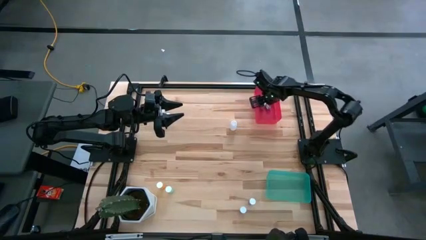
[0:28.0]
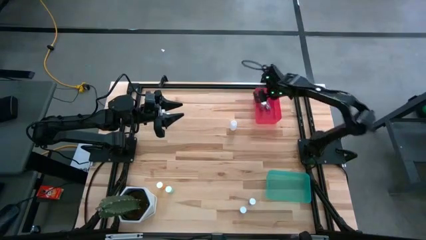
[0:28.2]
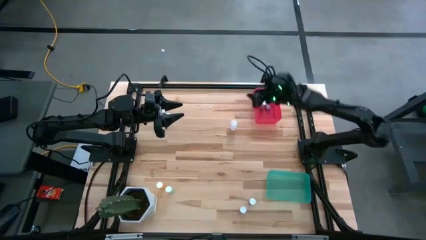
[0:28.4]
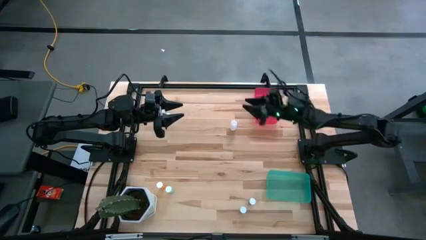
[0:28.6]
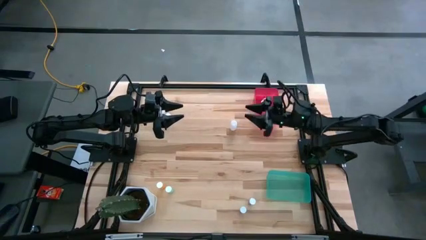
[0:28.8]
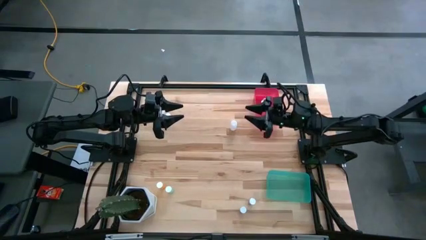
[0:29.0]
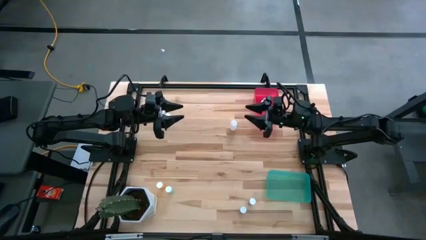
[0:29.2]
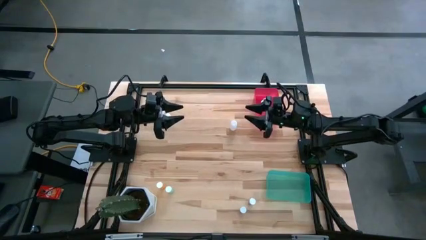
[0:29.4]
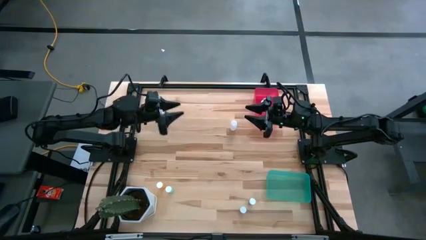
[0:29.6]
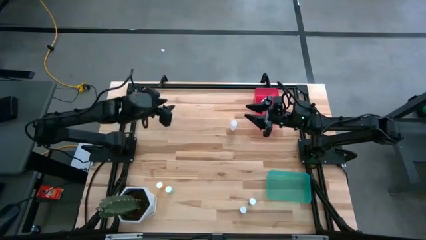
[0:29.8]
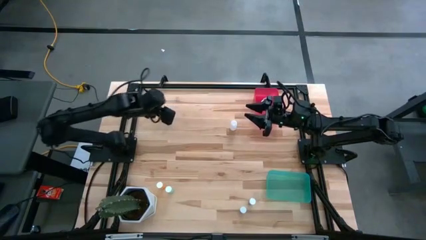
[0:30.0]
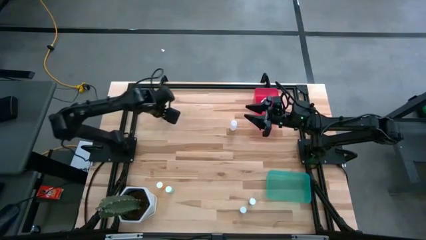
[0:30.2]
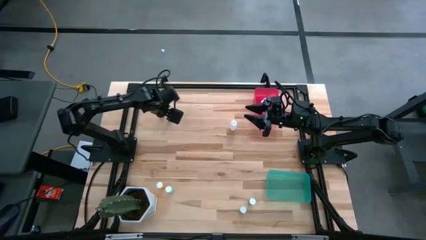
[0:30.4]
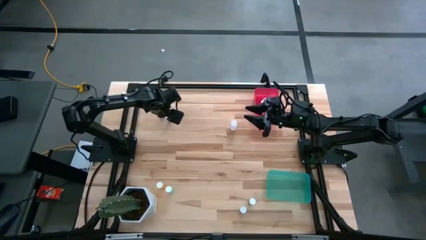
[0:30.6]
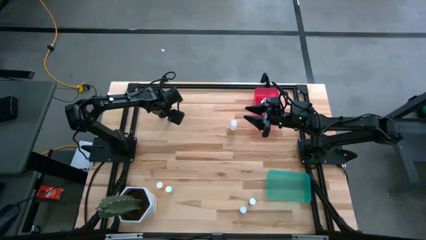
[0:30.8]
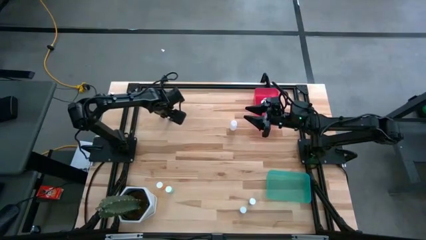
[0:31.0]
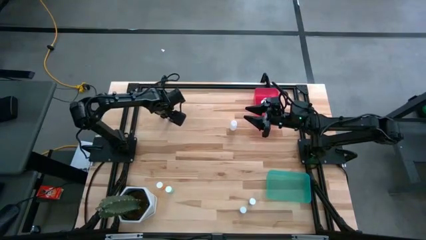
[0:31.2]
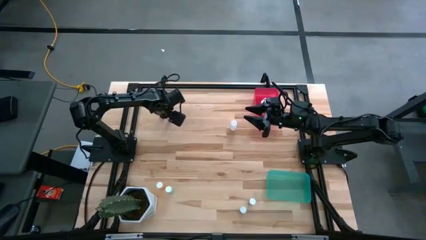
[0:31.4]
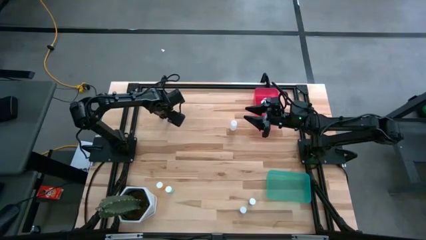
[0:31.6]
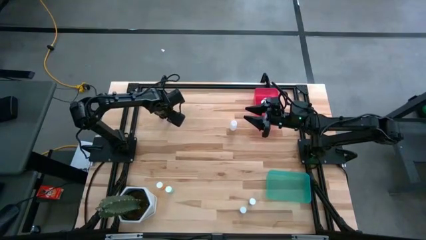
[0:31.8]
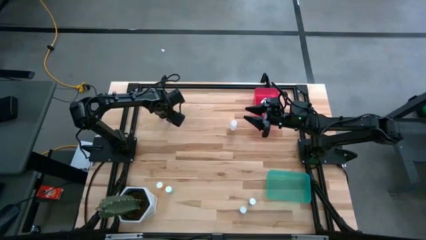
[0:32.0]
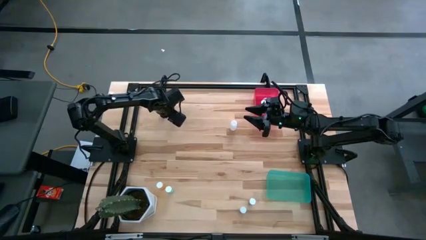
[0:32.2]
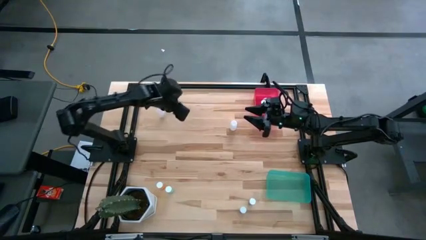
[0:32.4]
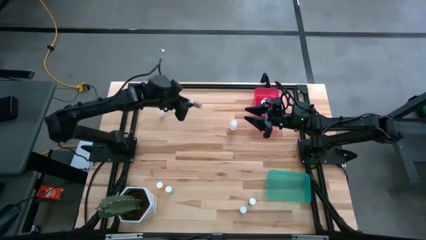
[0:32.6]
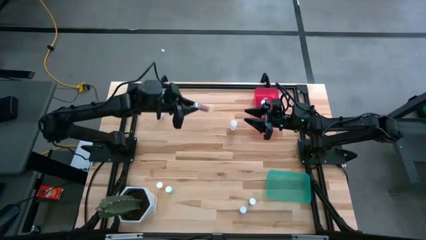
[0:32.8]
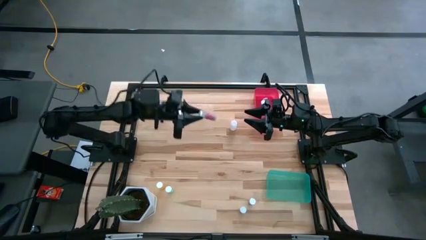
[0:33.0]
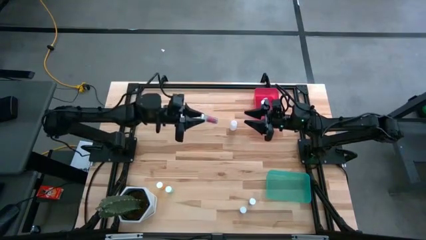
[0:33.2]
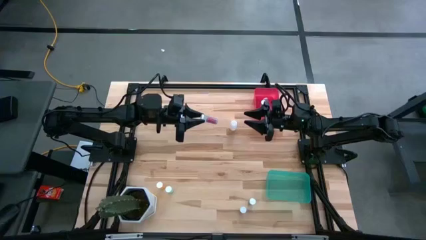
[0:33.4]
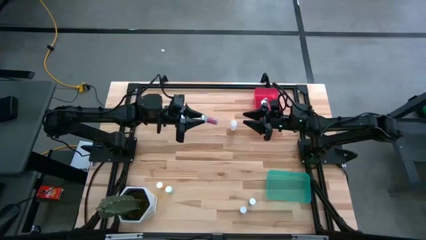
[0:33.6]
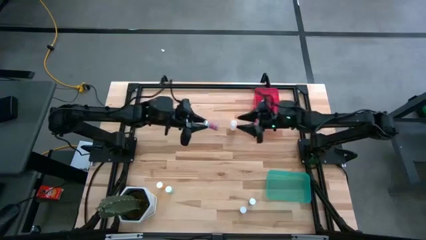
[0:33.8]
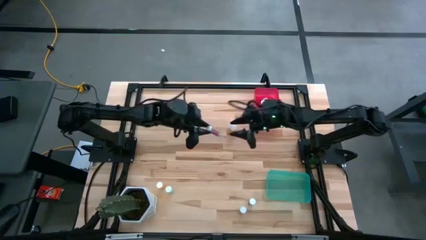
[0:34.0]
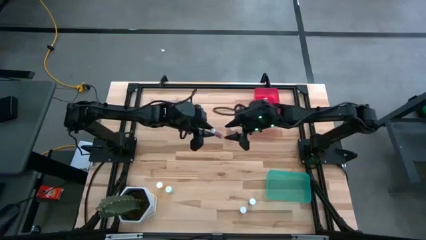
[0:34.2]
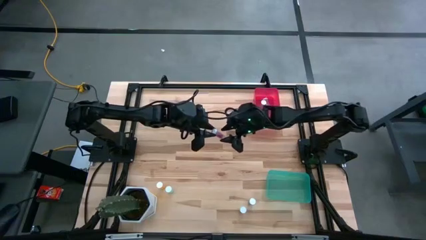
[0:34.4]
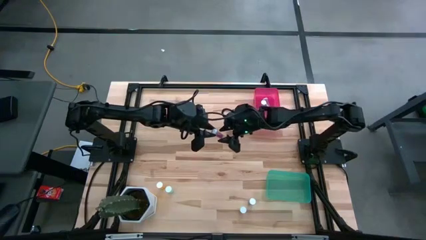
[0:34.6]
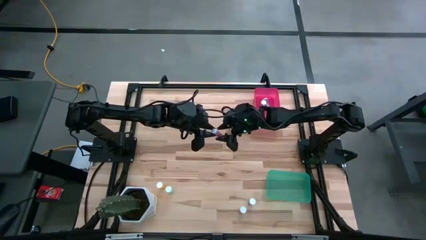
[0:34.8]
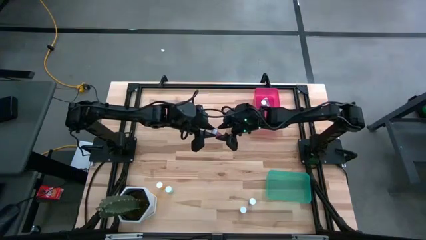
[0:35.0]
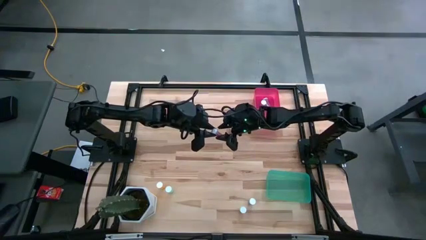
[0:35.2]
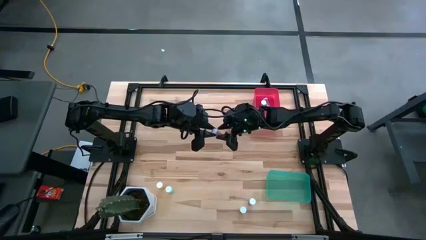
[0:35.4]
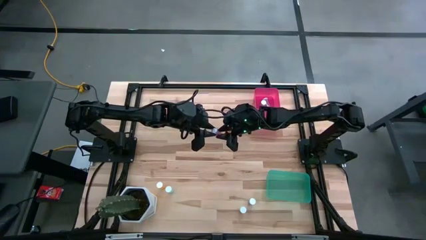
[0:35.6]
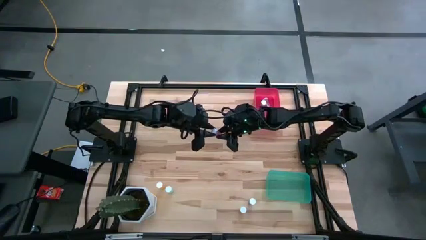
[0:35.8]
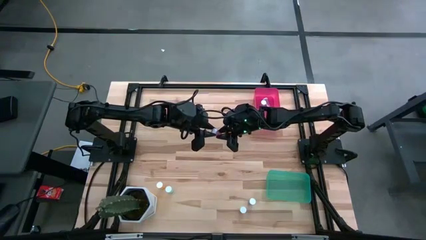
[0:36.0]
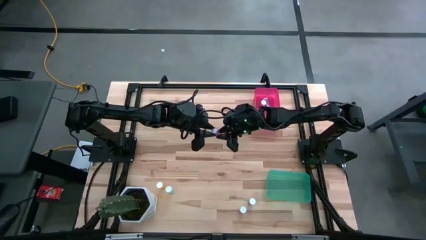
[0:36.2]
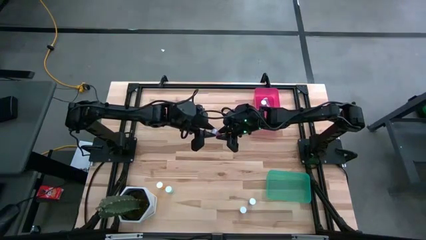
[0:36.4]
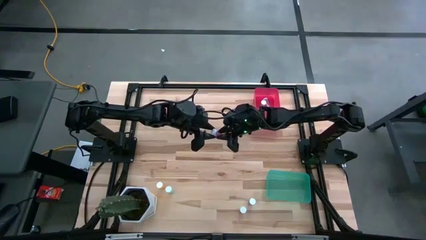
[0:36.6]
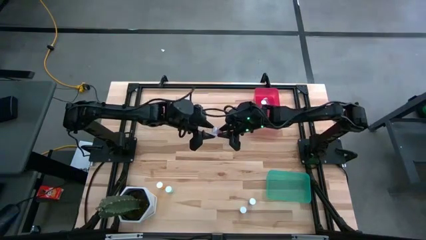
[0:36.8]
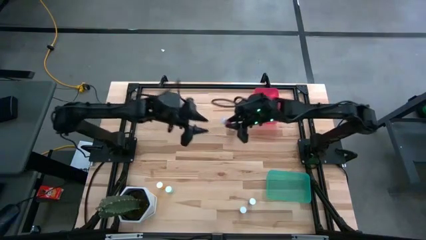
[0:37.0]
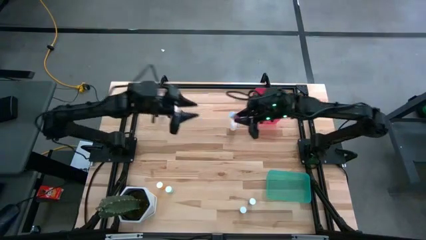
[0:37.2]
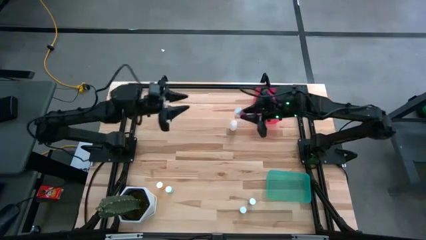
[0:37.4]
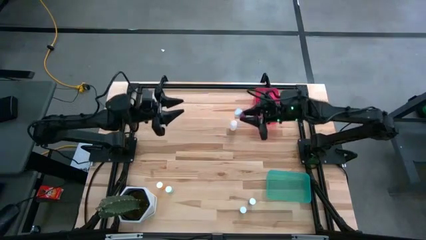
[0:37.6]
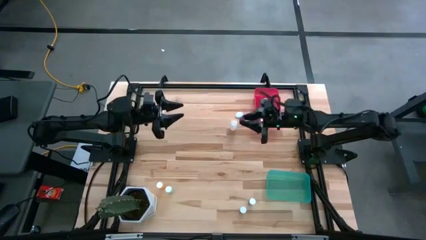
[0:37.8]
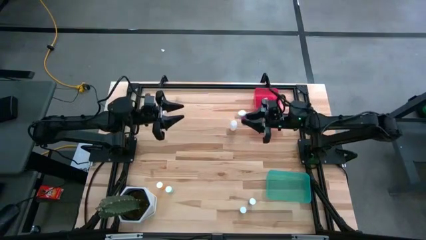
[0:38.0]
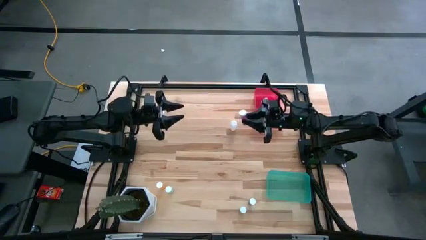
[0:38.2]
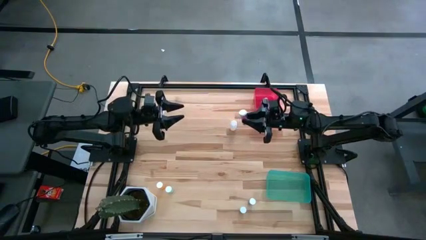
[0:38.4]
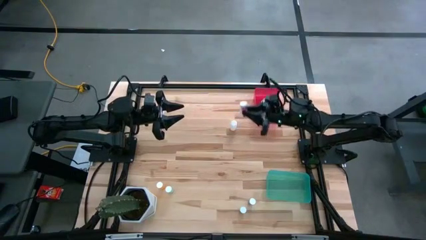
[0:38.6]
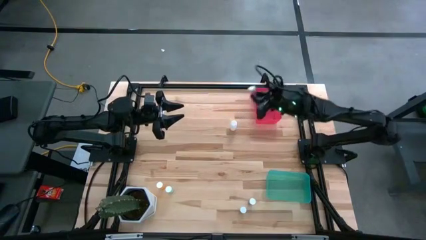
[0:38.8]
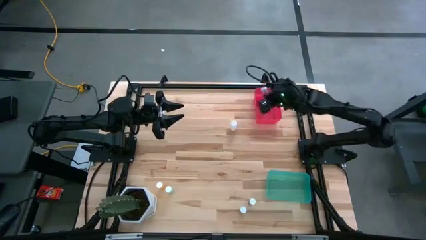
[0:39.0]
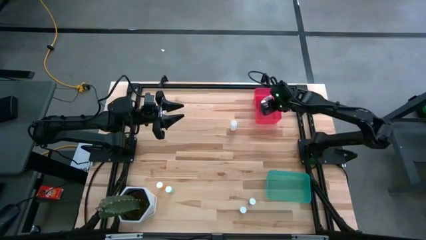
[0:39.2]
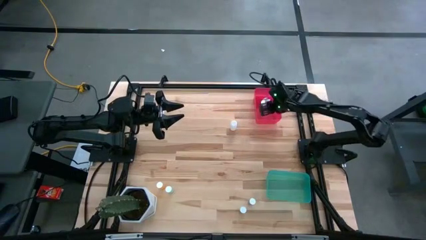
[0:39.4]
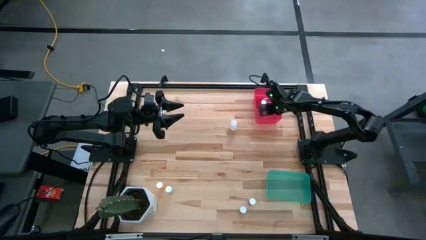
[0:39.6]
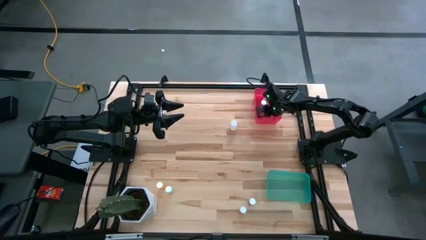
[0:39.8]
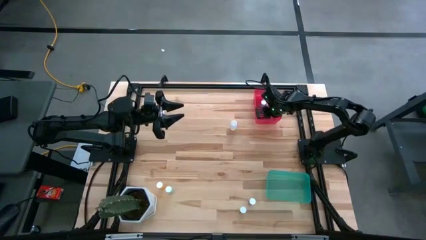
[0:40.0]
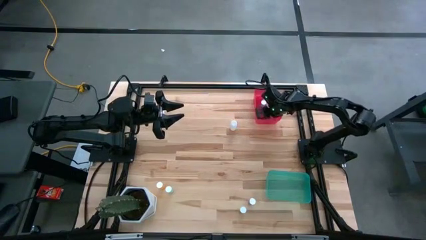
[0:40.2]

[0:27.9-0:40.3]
Task: Pick and place medicine bottles into bin by pill shape (circle, oval)
Put the blue capsule bottle into the red bin

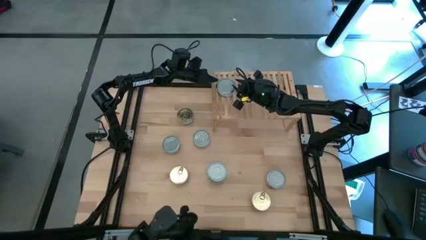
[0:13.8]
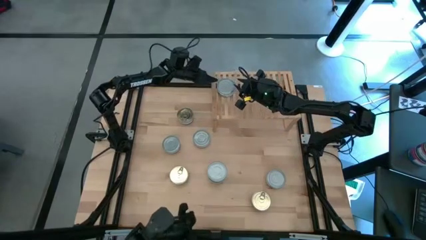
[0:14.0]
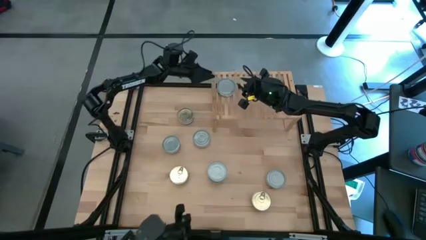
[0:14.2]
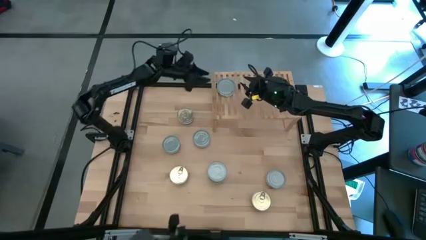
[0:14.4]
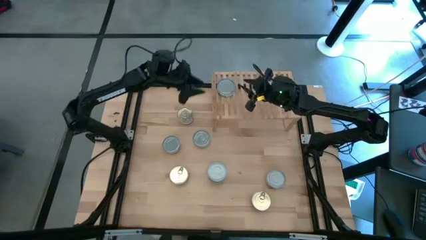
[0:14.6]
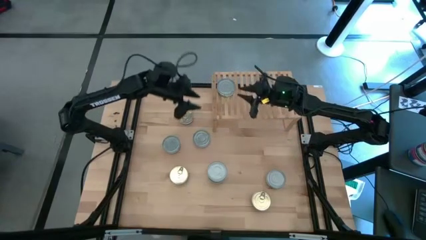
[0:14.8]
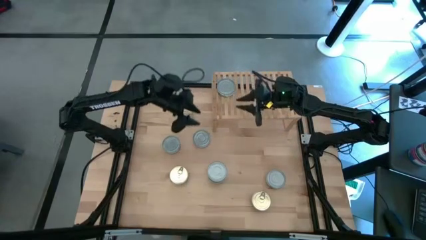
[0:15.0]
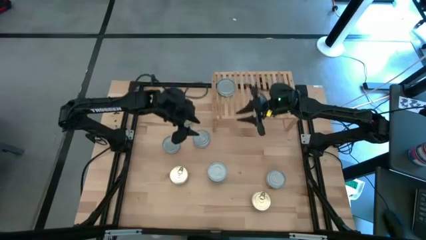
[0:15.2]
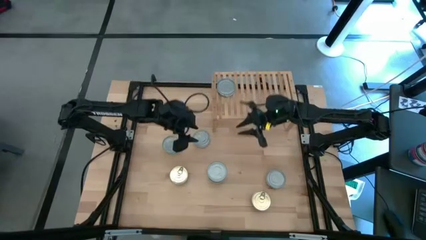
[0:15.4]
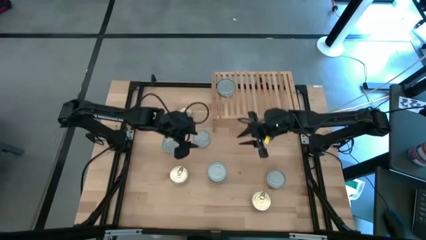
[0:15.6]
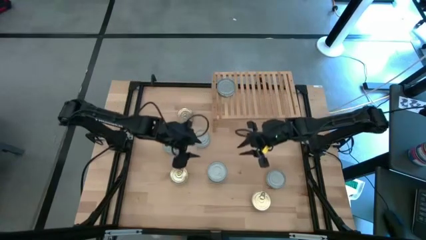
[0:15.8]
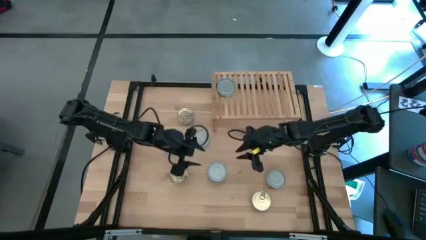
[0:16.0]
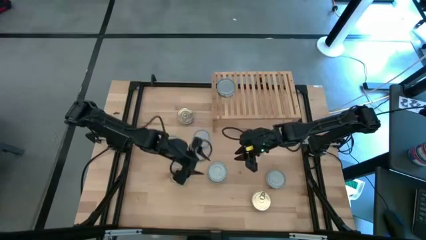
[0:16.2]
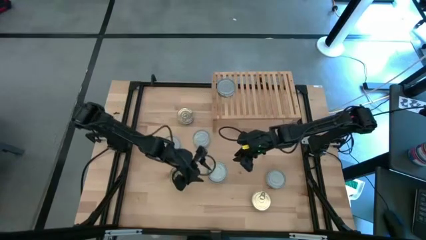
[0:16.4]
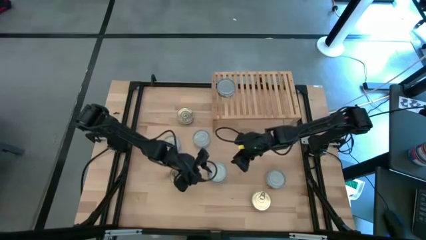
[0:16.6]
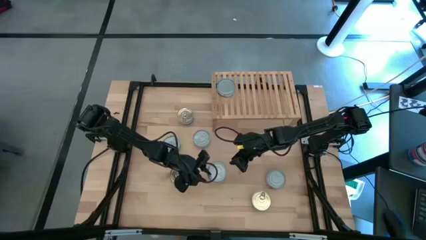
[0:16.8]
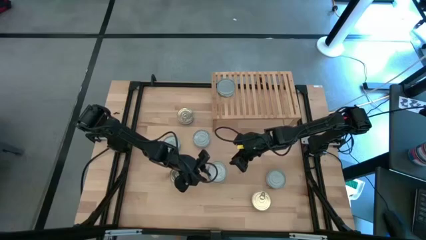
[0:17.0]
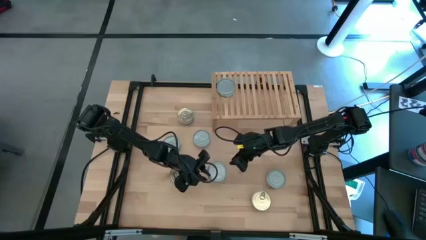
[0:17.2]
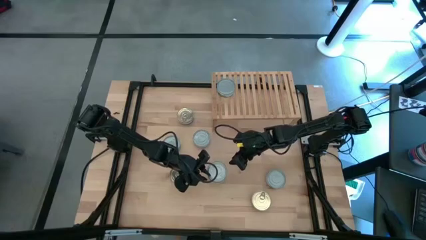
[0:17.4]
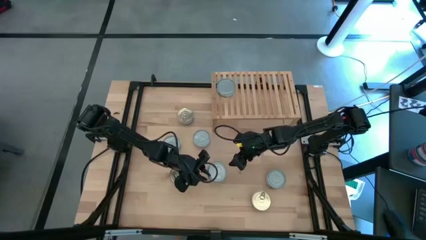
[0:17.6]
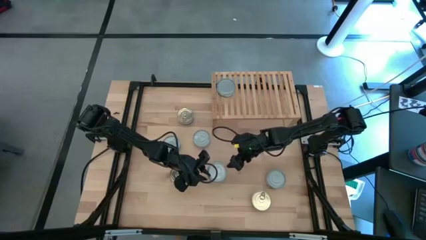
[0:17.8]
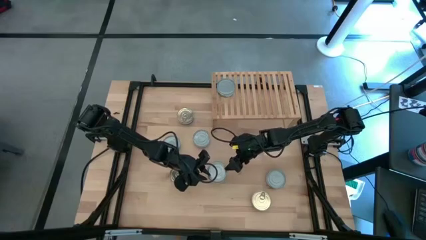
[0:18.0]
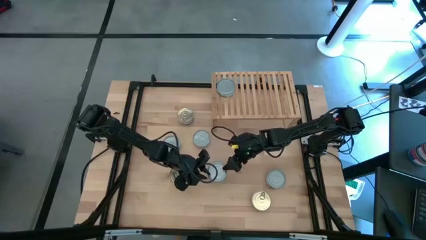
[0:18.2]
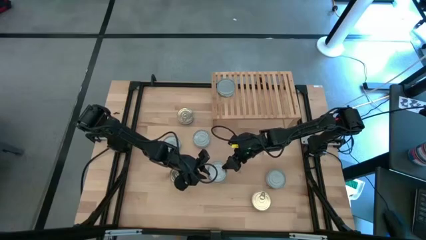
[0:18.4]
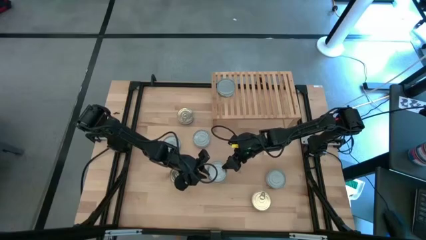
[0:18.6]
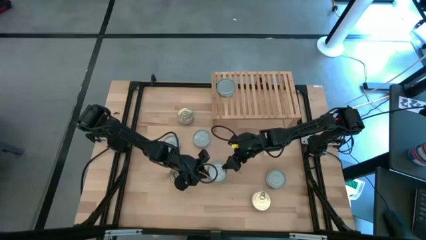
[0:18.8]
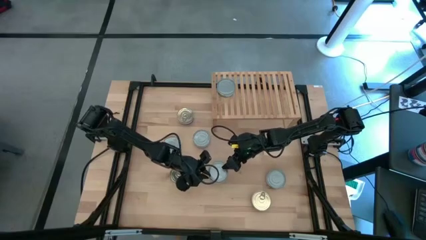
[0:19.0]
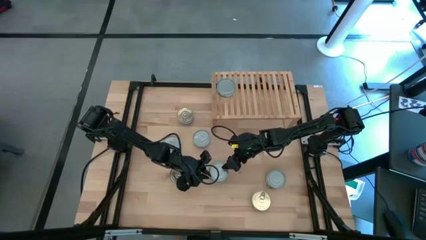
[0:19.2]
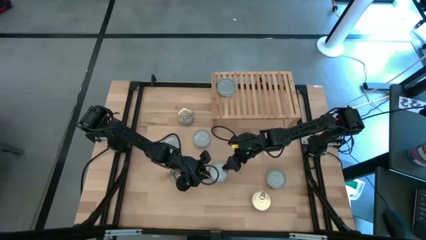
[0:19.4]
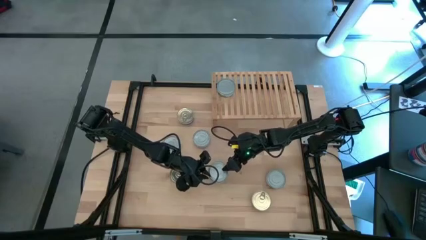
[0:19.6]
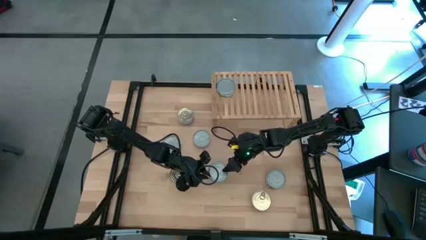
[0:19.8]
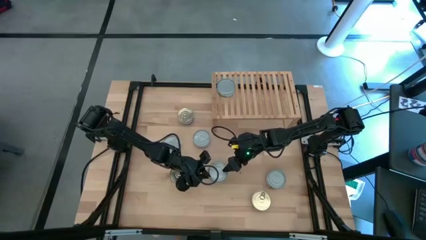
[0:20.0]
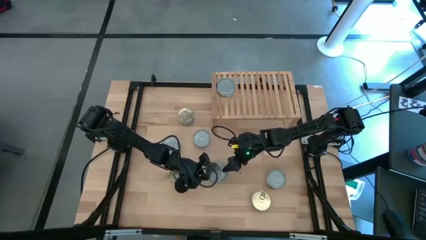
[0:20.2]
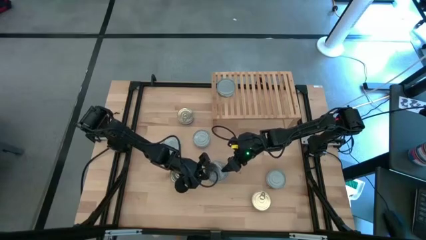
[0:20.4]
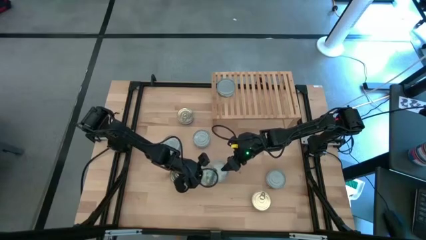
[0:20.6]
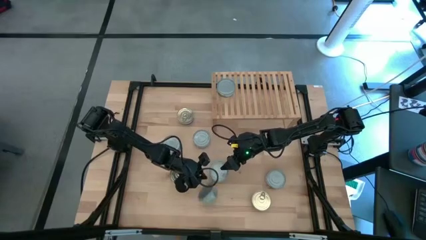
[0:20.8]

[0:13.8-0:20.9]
Task: Stack canned seafood by type on shelf
Stack the green tuna can on top of the green tuna can on the shelf
